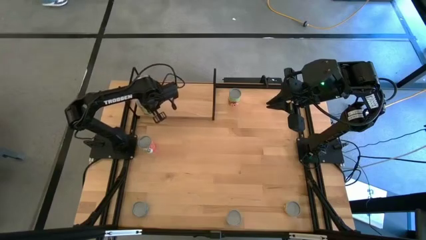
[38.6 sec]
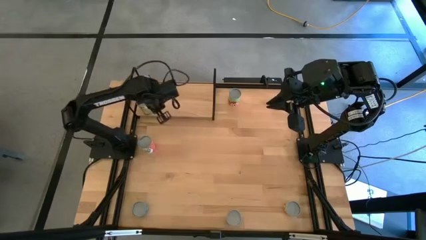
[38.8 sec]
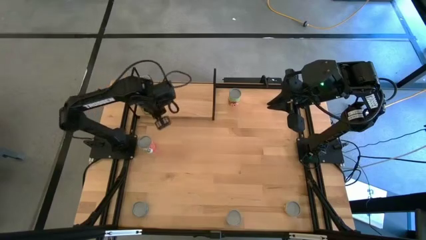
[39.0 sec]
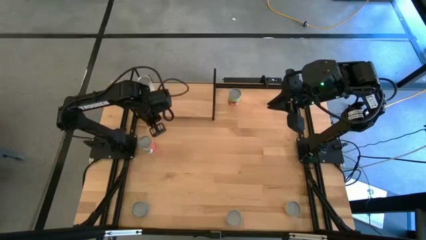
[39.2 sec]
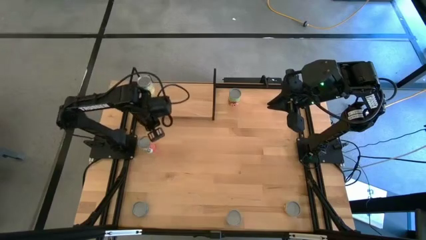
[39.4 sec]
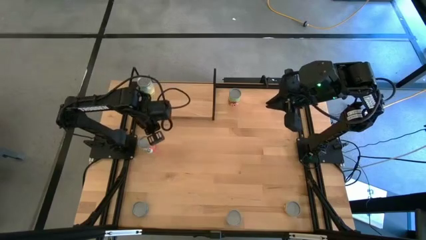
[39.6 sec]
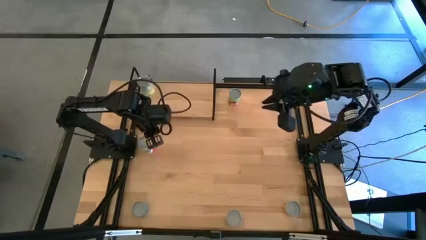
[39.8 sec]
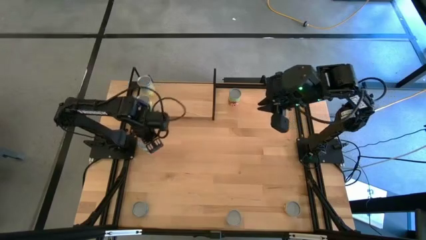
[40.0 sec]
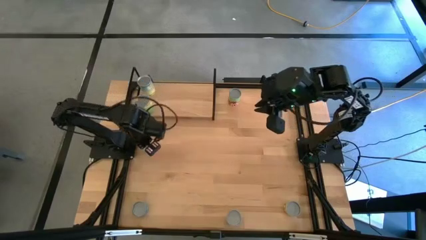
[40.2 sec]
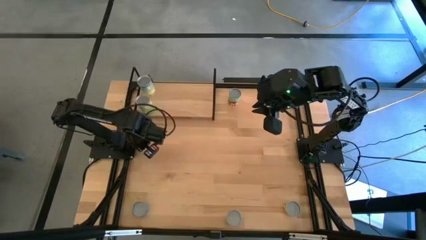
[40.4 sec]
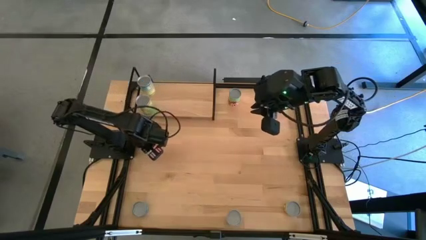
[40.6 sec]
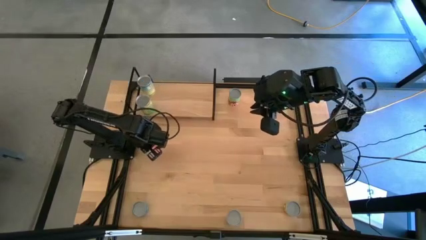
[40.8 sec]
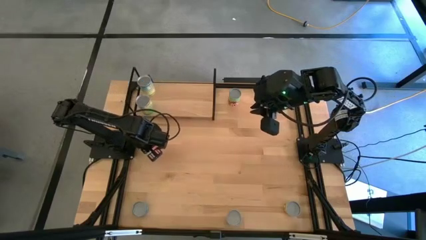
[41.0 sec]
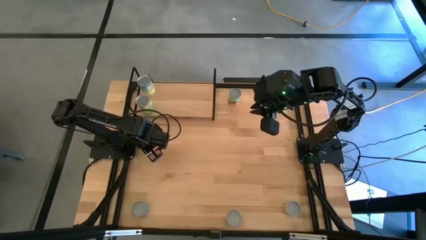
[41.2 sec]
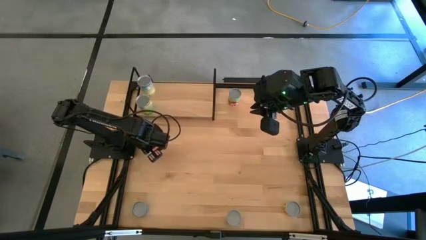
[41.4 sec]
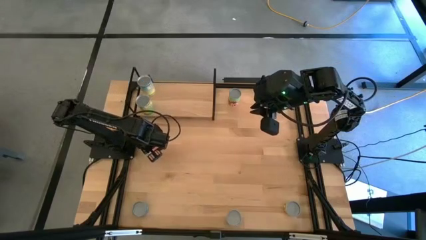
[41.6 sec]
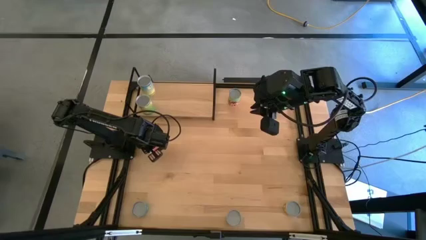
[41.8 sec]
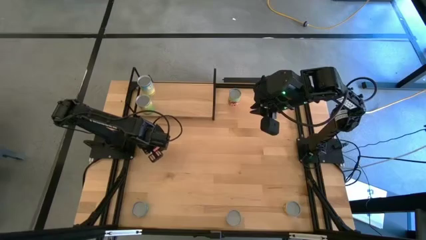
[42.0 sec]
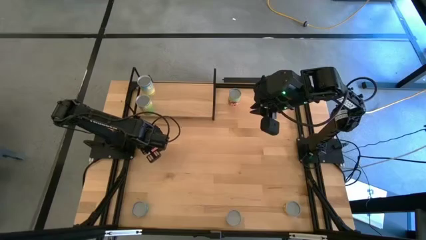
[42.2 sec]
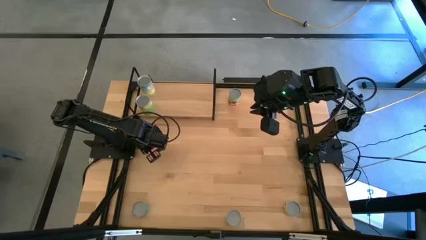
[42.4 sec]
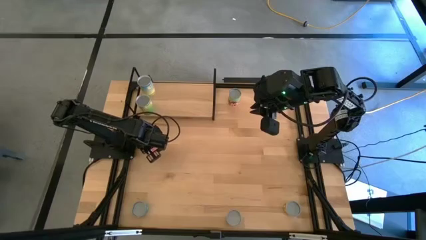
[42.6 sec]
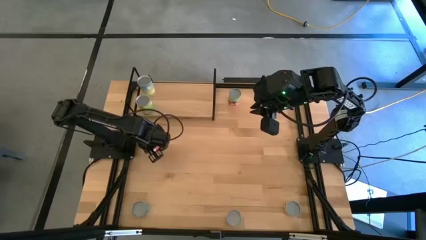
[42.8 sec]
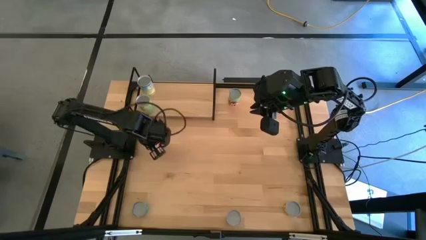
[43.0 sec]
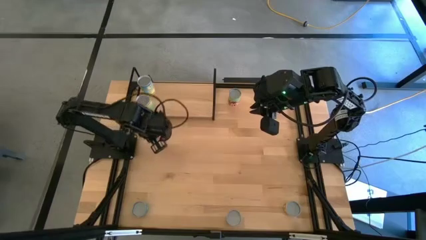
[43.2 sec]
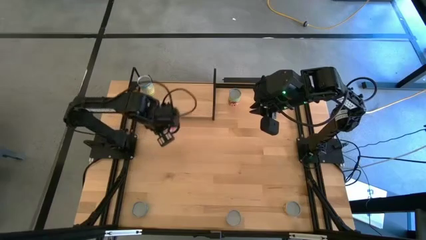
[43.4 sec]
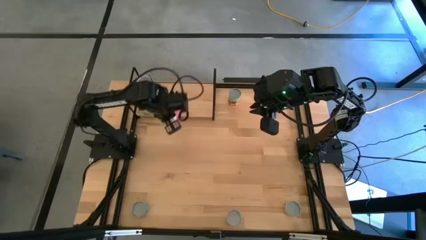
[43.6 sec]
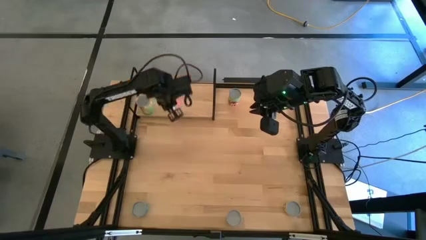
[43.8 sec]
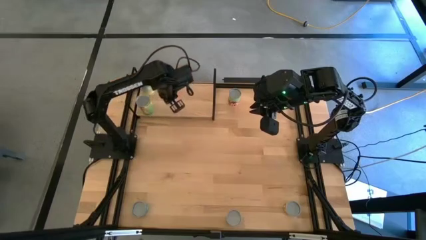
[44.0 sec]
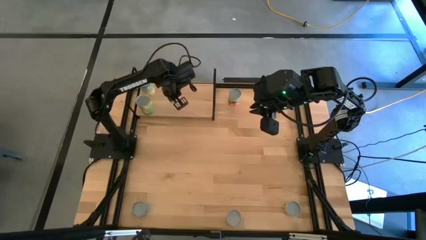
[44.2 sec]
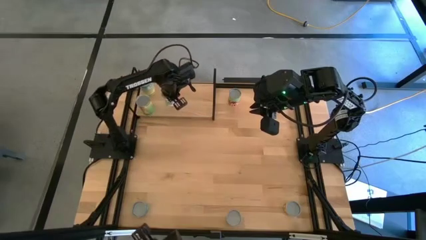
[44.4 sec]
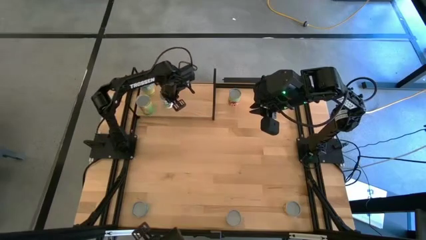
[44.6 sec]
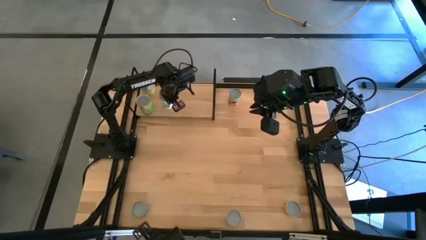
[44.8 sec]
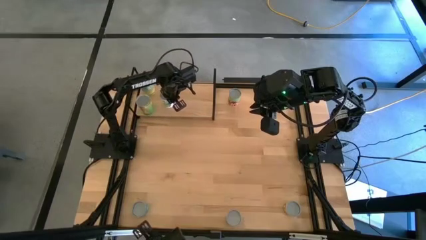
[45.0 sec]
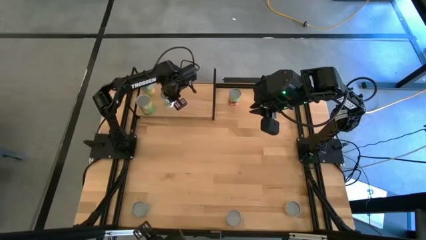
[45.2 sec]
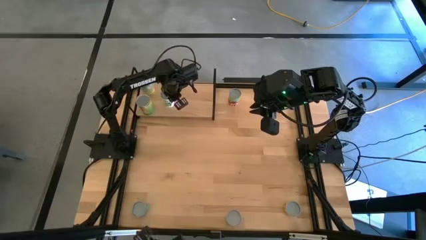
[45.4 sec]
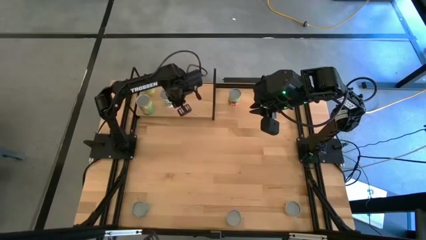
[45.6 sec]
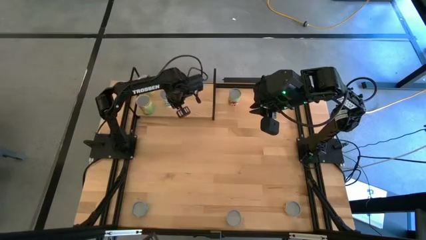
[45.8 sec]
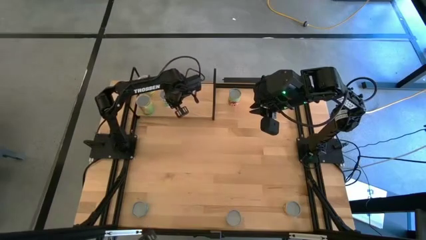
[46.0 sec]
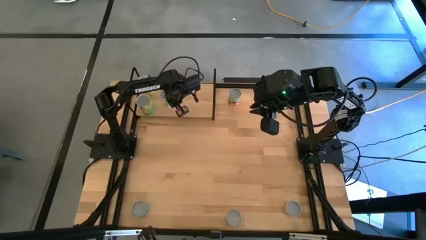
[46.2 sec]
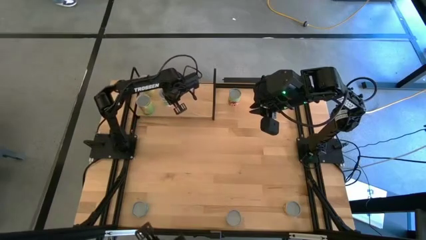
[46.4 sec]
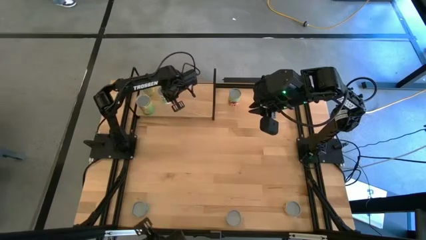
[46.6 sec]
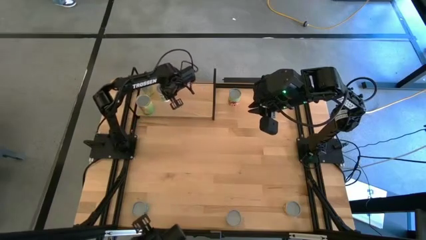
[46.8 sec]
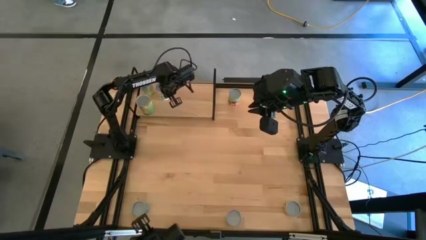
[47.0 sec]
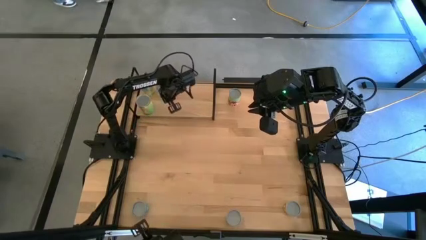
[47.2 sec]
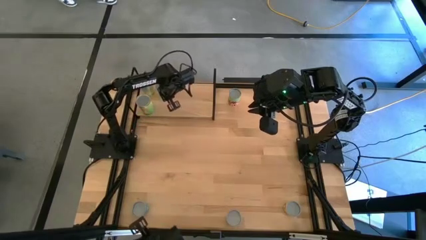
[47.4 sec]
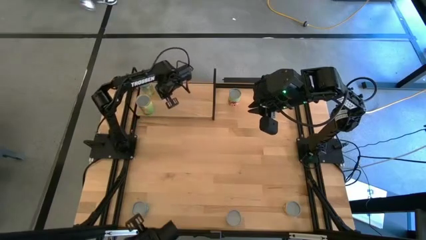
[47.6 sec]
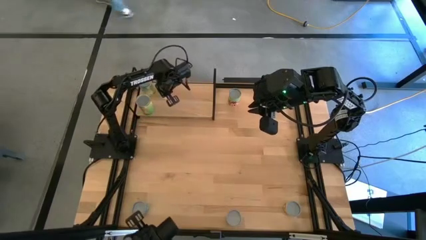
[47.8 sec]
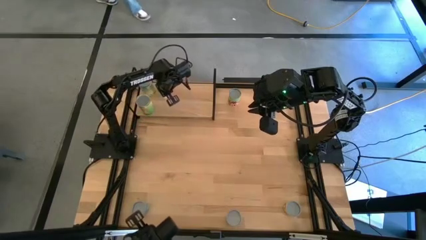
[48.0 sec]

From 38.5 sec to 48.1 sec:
Task: Pick and place cans onto a shelf
Put the canned mixed fruits on the shelf

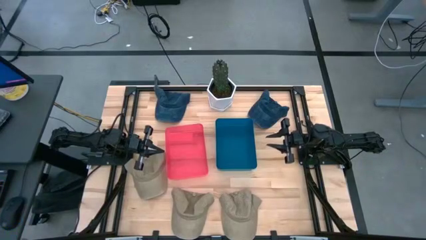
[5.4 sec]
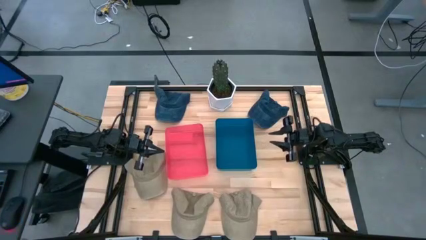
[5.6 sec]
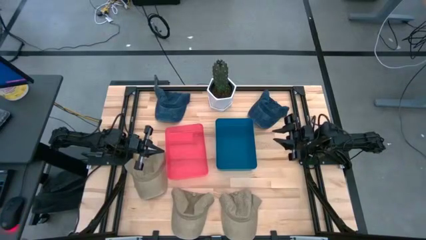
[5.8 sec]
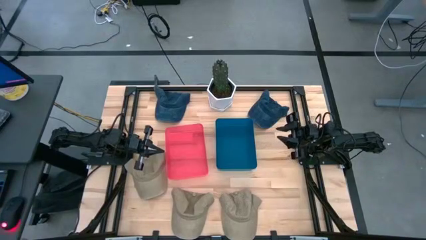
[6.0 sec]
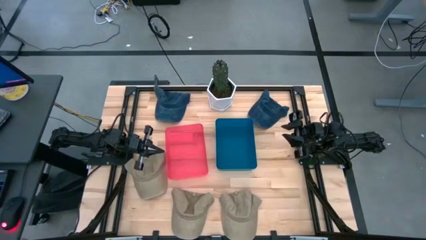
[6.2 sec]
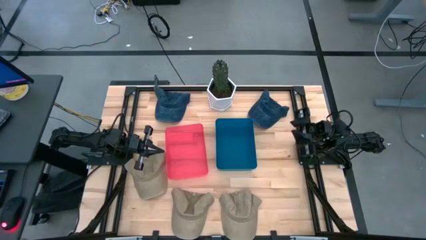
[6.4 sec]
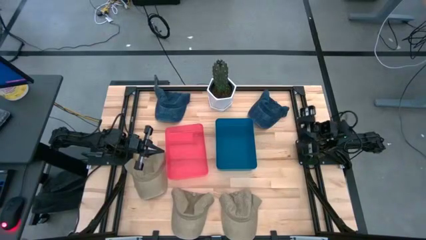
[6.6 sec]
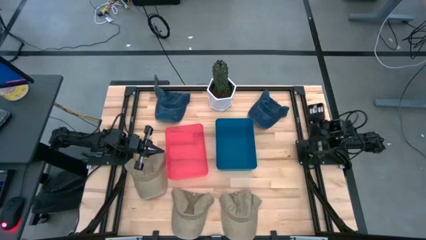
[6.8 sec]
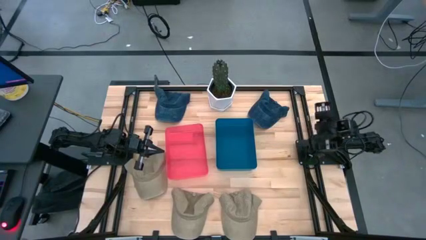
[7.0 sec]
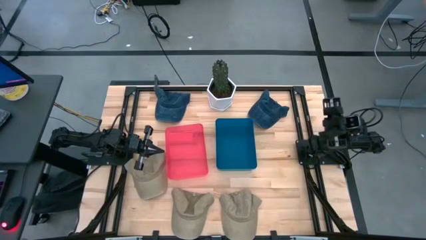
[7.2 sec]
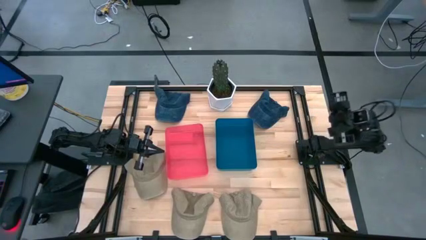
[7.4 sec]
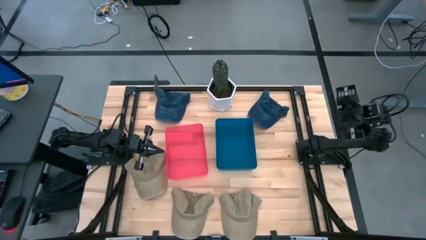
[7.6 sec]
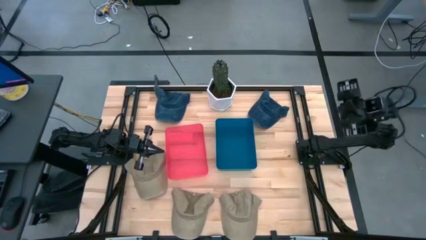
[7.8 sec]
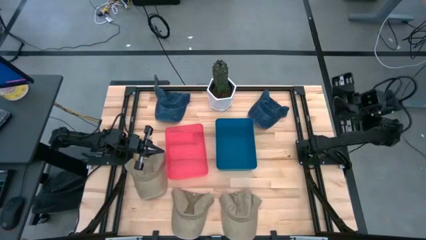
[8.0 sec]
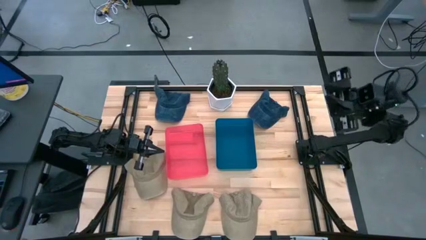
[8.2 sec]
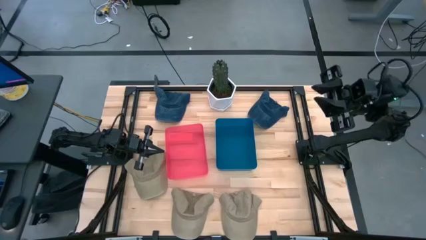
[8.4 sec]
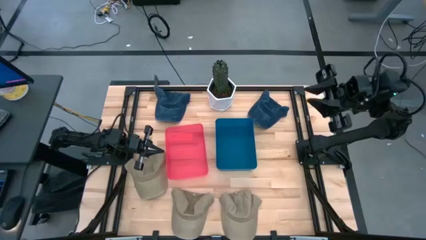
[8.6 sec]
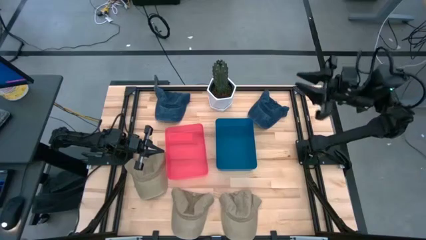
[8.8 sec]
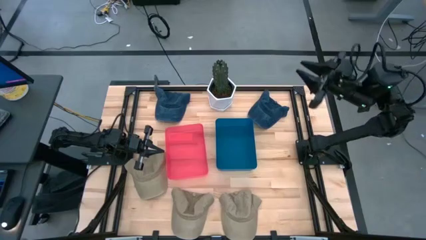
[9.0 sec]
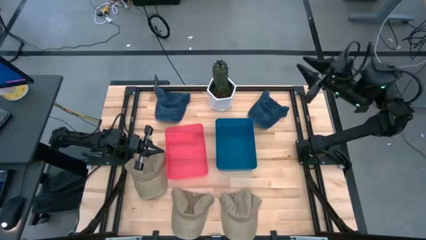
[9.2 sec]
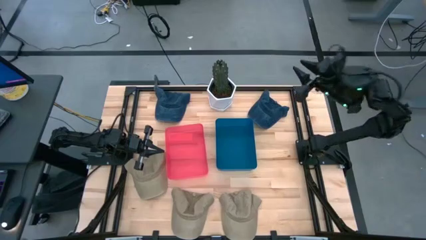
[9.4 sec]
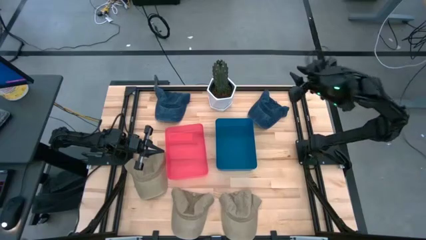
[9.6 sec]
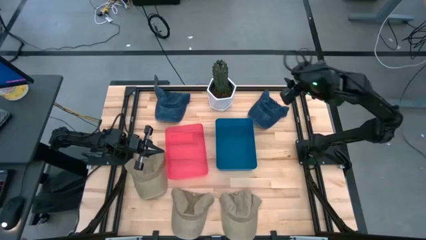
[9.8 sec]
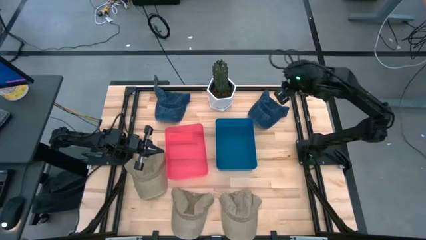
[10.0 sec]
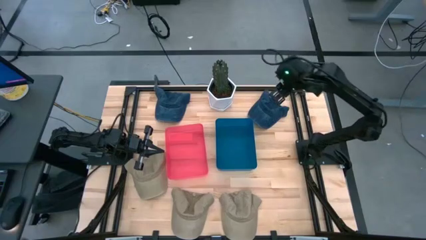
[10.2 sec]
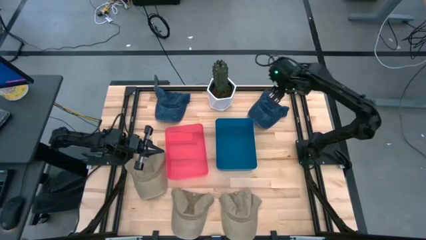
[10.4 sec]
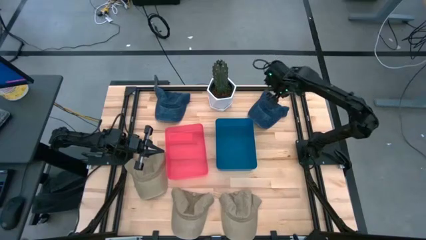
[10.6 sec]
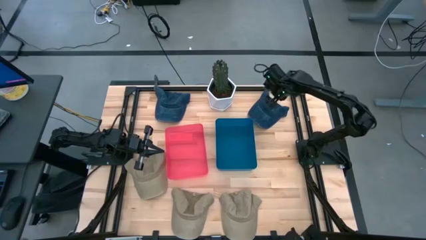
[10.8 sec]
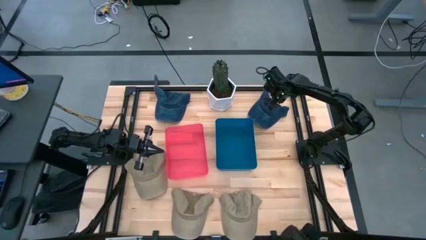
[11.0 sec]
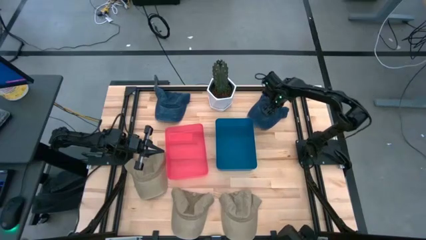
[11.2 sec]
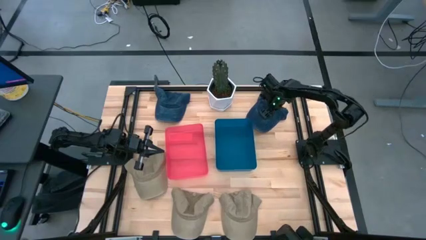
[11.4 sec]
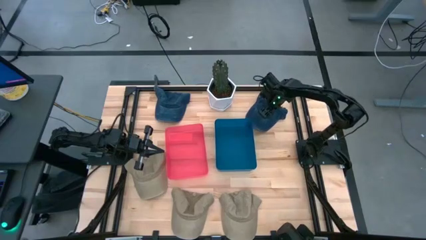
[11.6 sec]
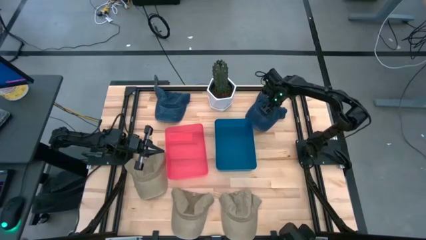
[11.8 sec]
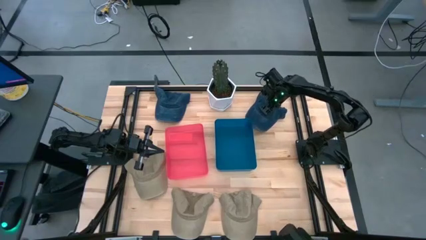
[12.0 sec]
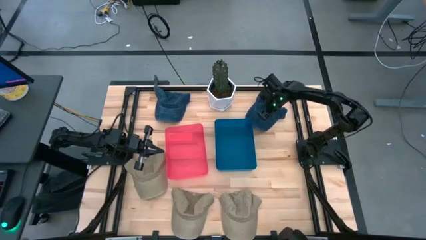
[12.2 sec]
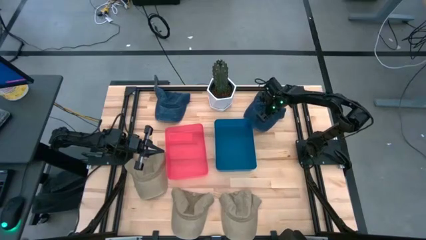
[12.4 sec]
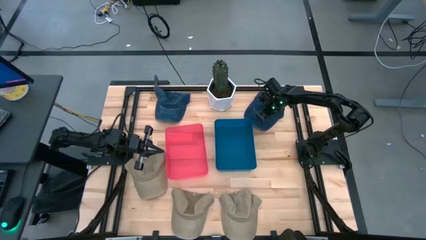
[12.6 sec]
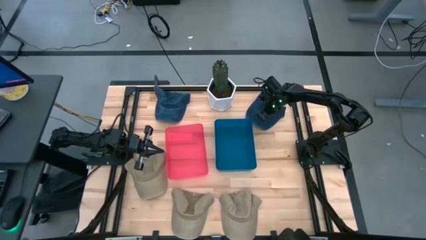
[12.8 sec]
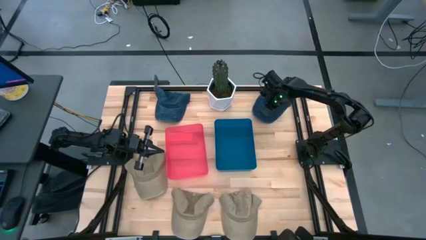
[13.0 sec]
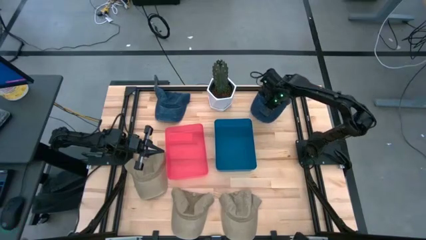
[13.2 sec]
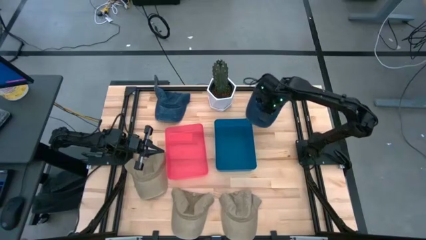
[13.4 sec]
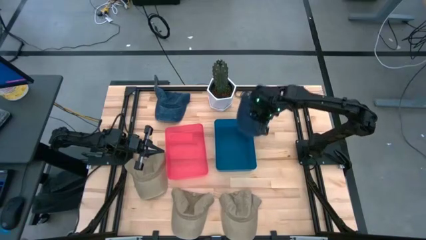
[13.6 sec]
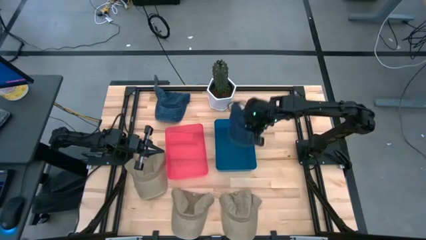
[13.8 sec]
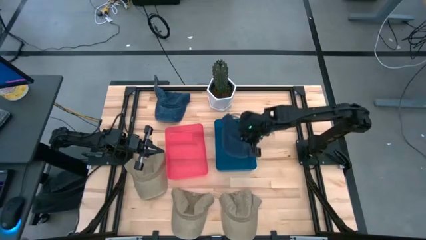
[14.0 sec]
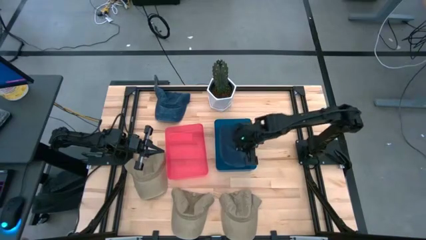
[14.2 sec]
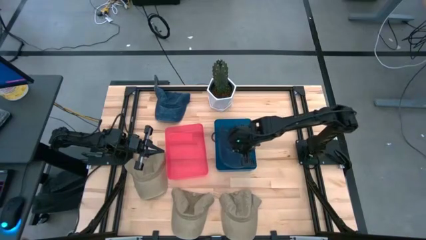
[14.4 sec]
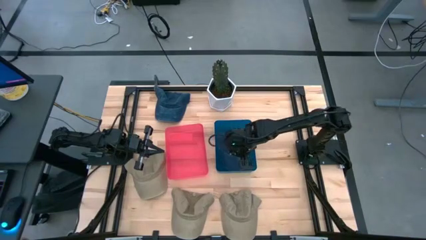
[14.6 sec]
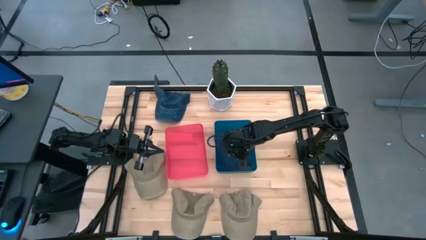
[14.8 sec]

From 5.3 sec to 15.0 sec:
Task: Pick & Place hat
Put the right blue cap into the blue bin
